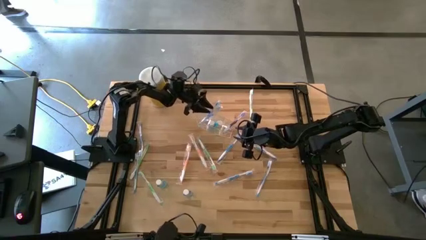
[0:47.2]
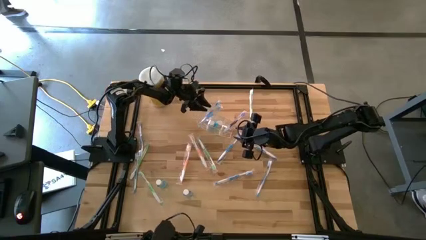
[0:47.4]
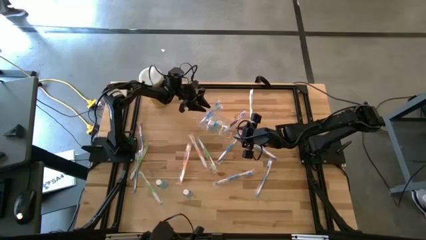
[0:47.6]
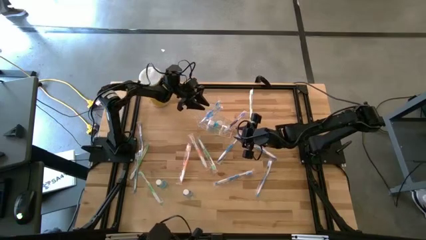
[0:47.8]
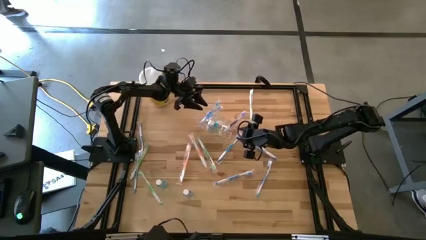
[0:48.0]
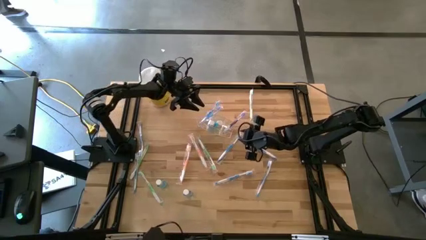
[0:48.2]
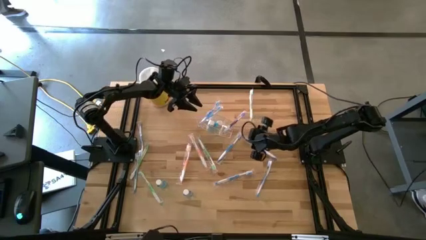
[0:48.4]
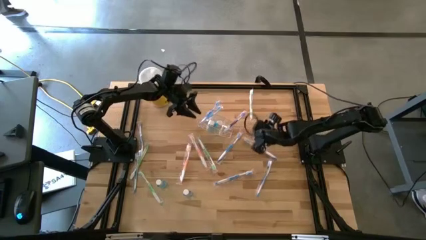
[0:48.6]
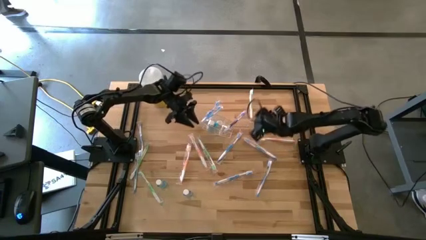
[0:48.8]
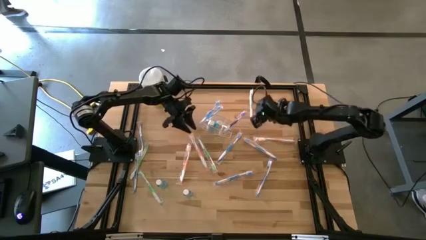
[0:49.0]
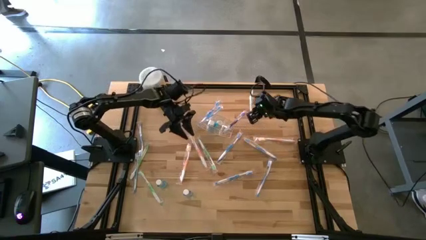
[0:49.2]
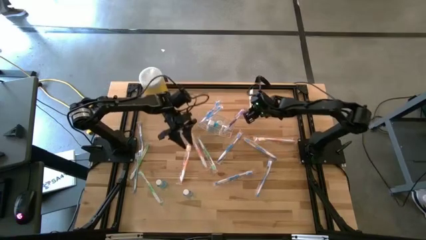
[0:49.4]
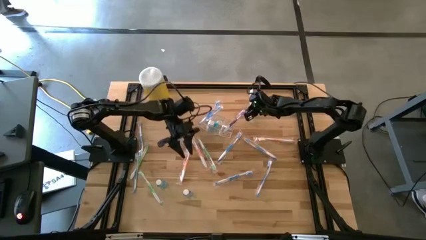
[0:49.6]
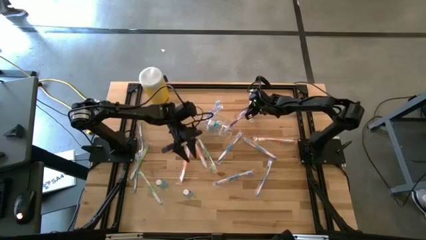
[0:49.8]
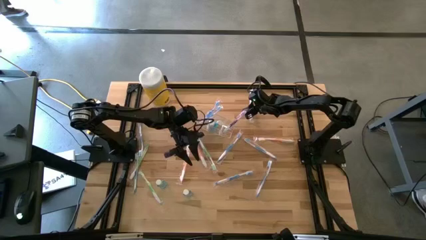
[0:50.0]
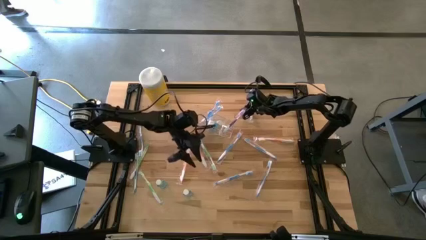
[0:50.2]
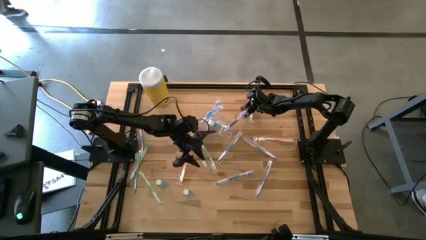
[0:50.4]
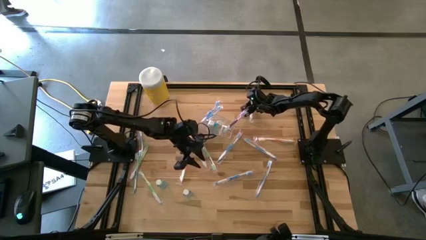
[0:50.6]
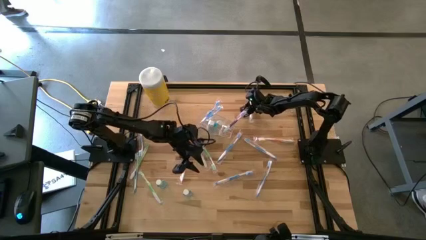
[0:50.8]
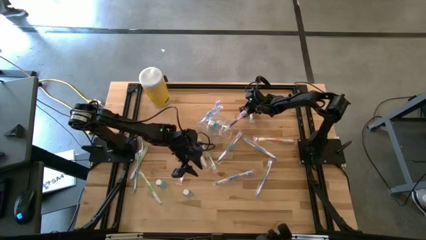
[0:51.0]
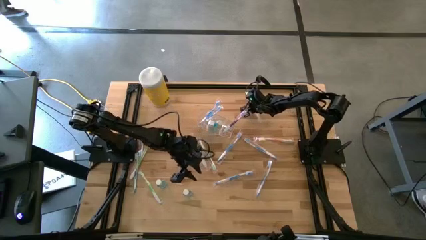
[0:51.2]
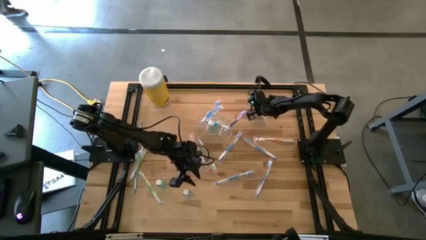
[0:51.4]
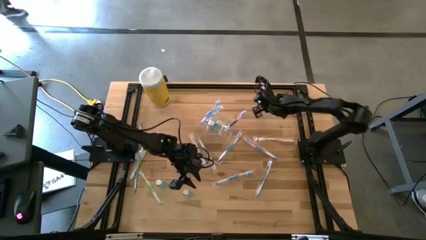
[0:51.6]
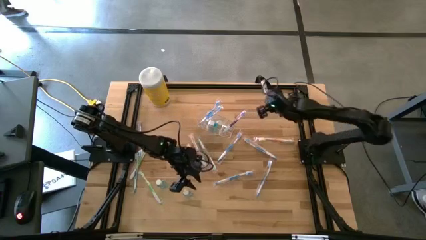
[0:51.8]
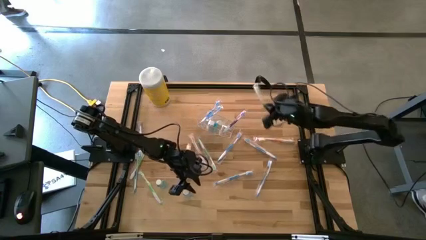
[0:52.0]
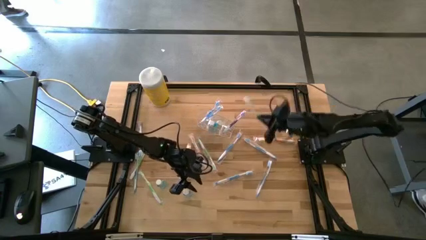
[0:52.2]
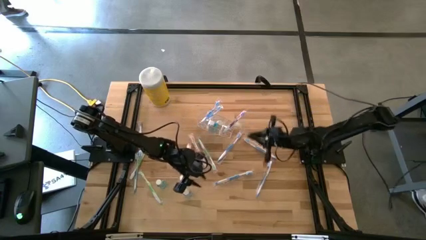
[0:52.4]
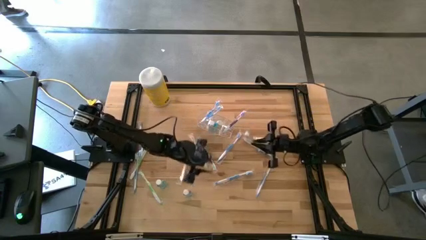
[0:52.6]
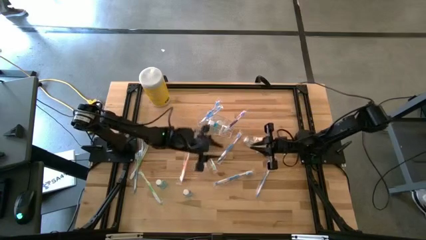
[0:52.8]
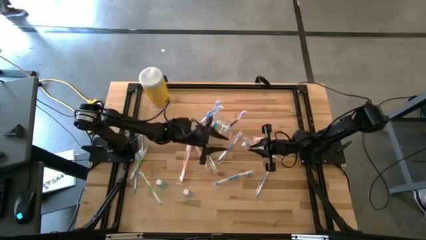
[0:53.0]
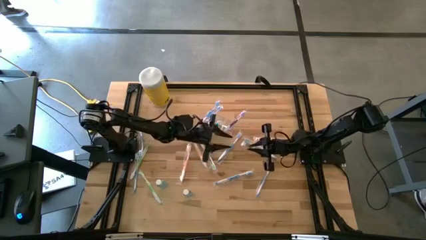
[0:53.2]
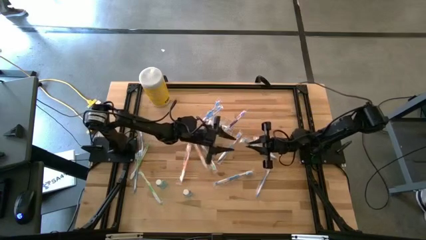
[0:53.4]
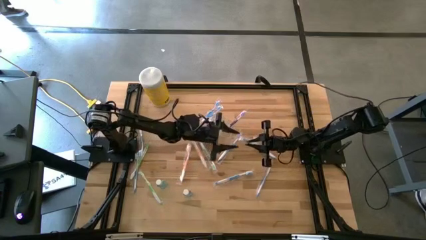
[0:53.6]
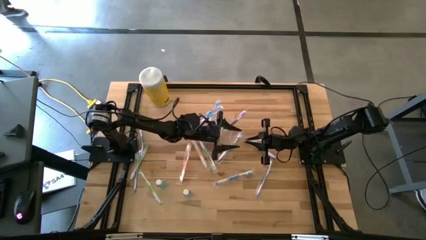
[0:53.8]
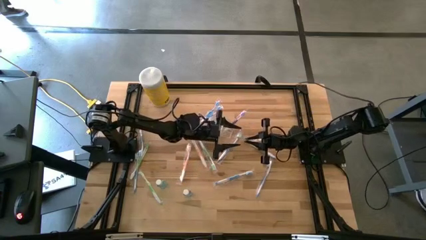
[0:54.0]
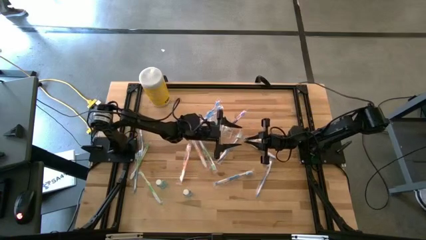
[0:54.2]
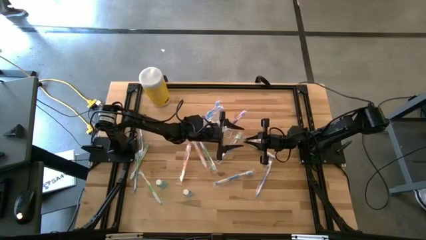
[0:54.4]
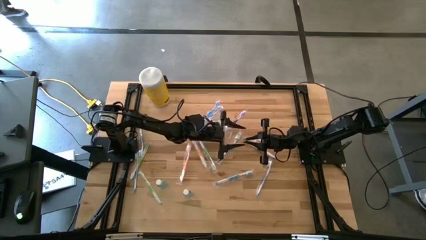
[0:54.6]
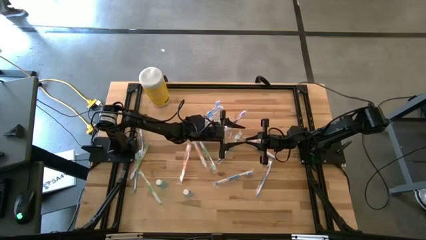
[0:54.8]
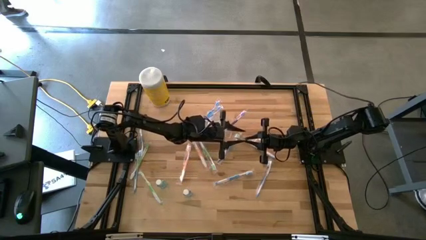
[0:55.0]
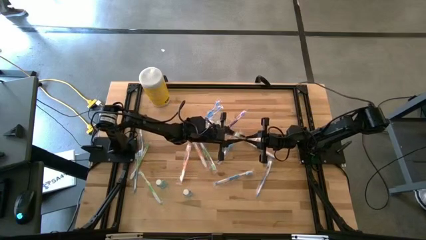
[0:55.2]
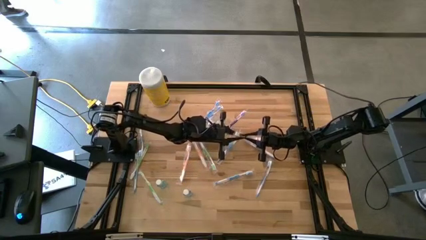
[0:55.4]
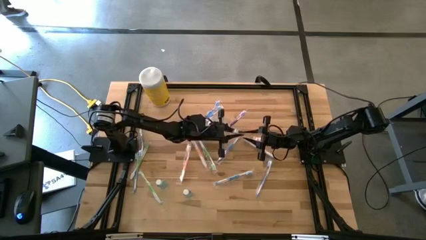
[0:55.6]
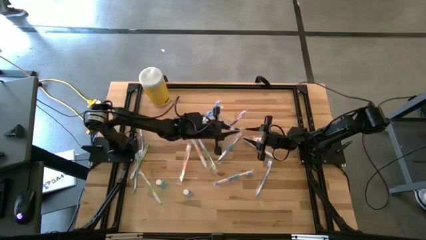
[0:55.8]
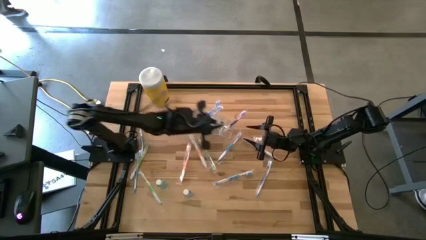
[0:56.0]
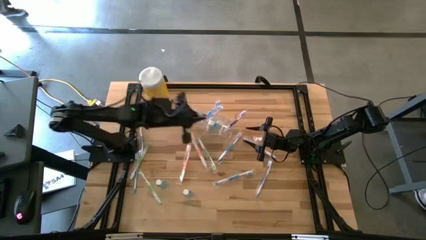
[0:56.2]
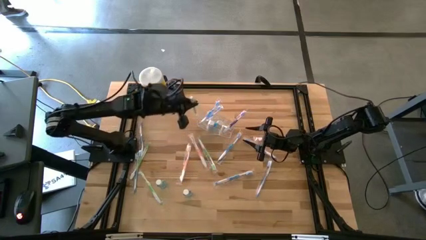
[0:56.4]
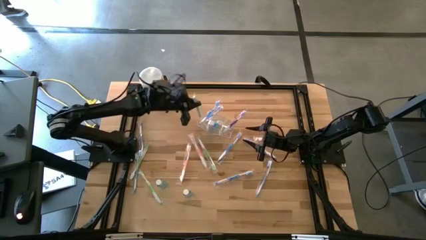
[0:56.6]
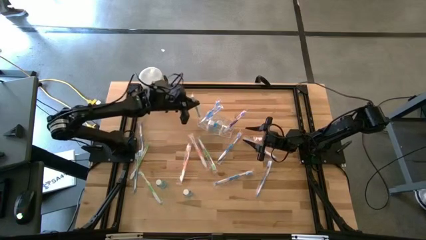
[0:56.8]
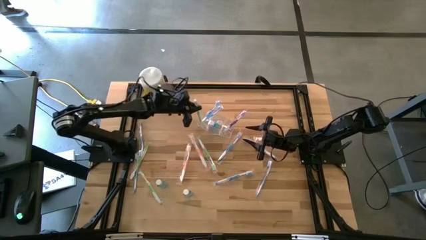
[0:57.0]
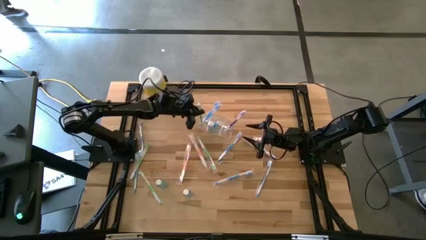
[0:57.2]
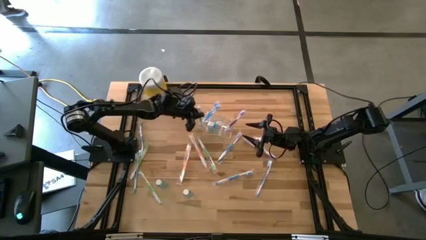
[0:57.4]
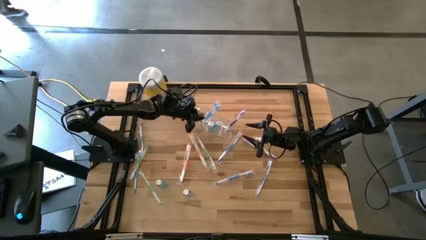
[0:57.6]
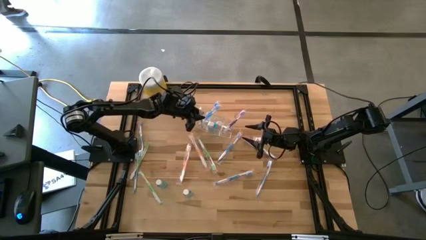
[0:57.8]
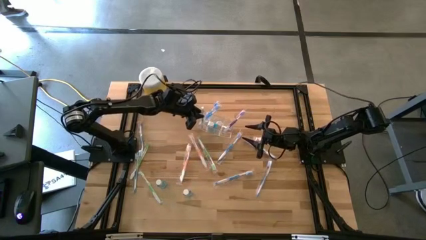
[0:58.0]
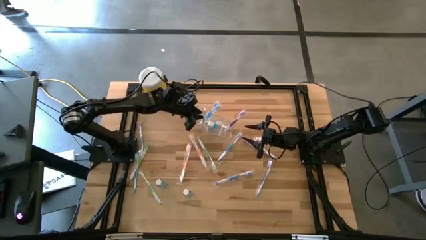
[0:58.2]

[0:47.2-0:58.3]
Task: Pick & Place toothbrushing station
Put the green toothbrush into the transparent organizer

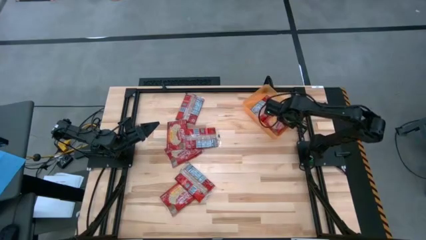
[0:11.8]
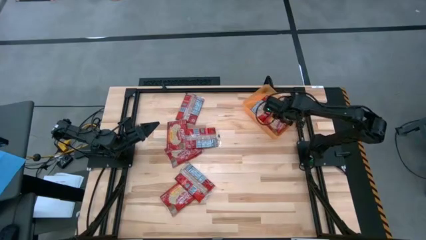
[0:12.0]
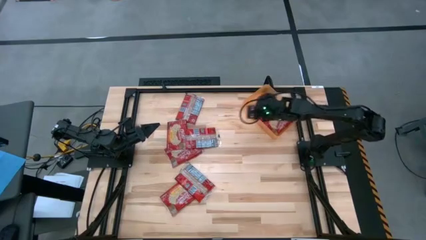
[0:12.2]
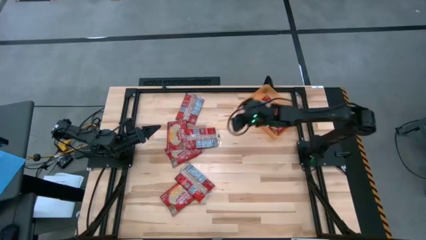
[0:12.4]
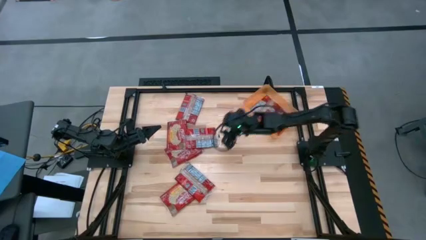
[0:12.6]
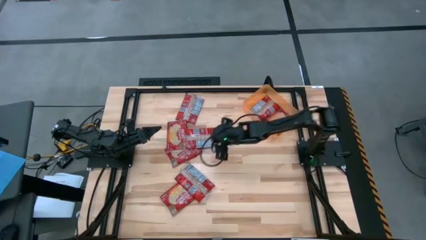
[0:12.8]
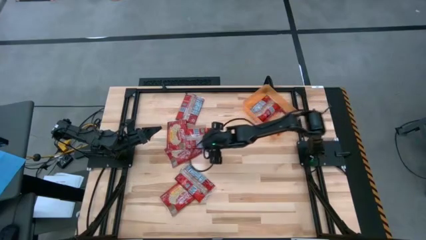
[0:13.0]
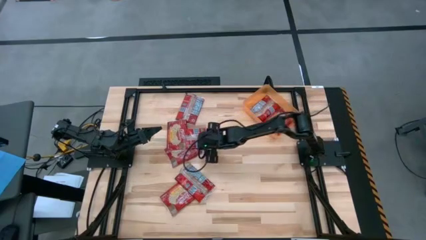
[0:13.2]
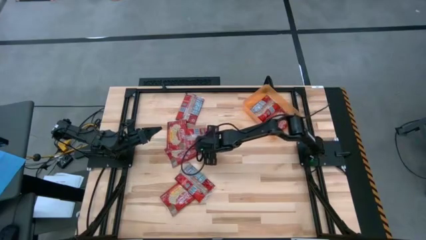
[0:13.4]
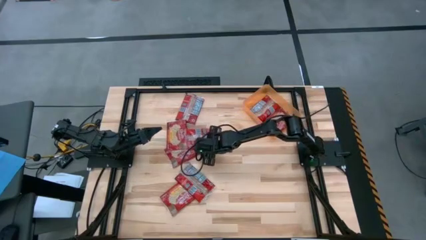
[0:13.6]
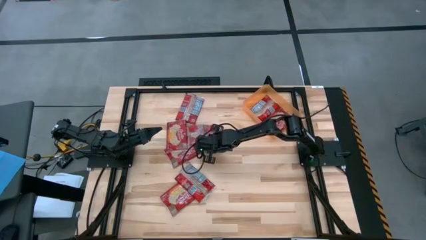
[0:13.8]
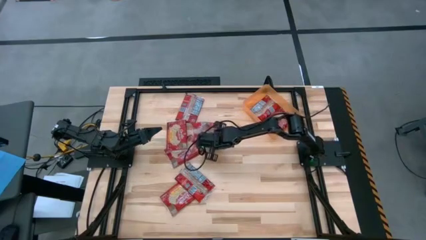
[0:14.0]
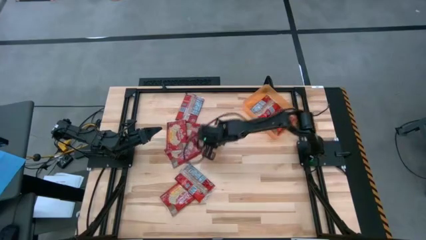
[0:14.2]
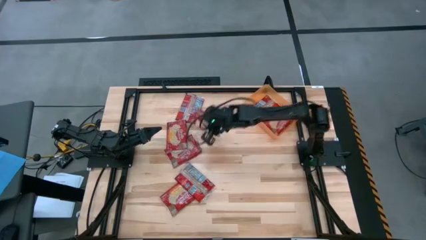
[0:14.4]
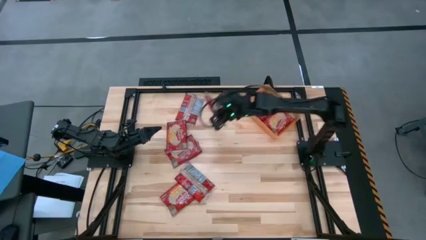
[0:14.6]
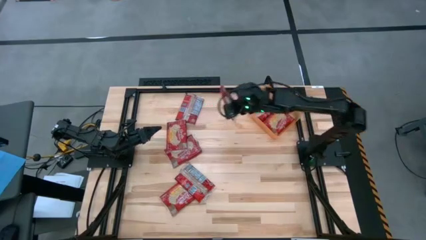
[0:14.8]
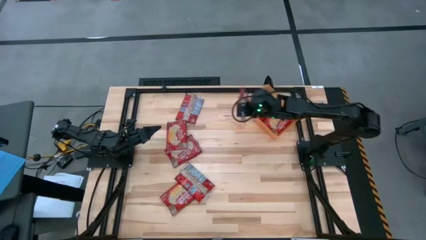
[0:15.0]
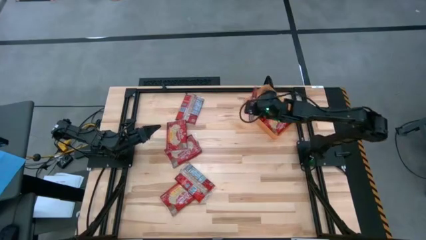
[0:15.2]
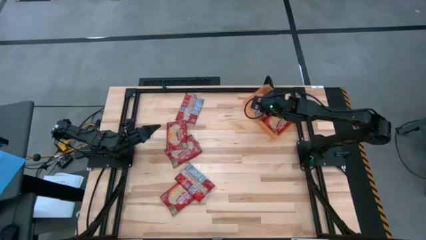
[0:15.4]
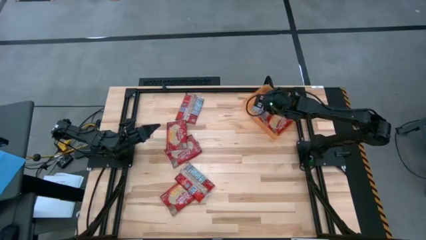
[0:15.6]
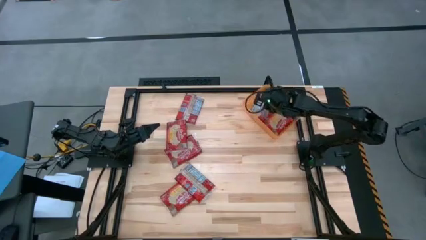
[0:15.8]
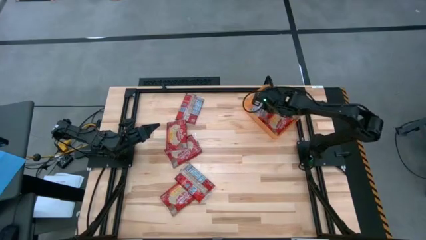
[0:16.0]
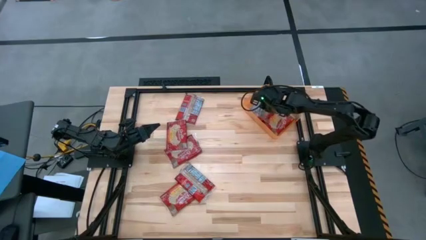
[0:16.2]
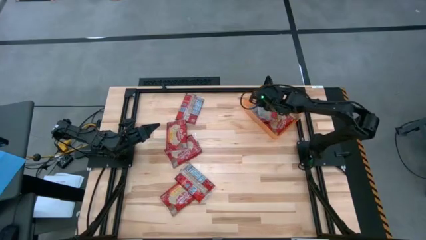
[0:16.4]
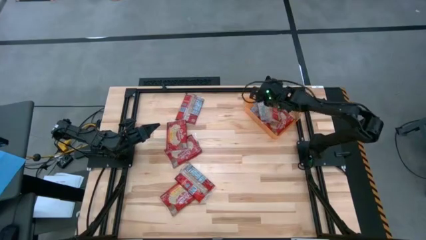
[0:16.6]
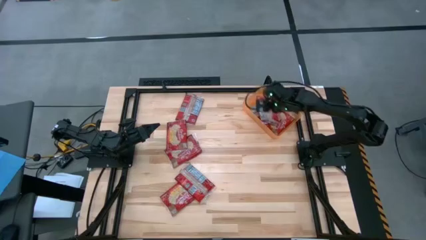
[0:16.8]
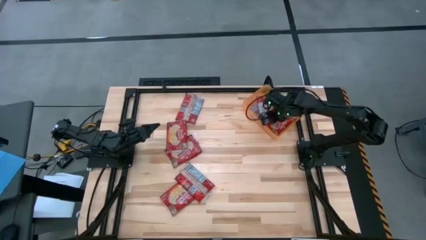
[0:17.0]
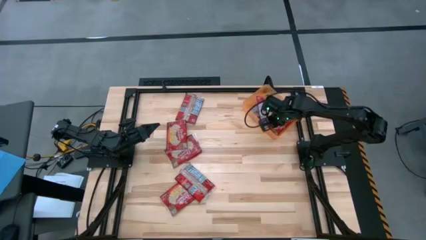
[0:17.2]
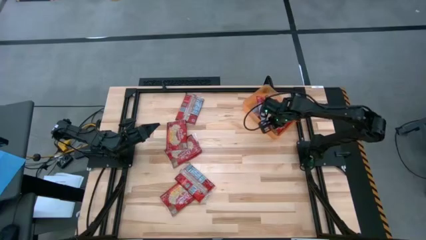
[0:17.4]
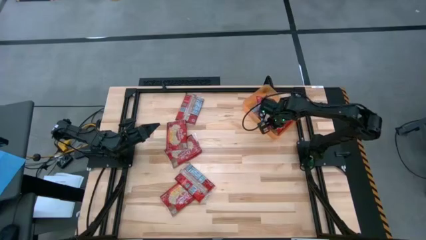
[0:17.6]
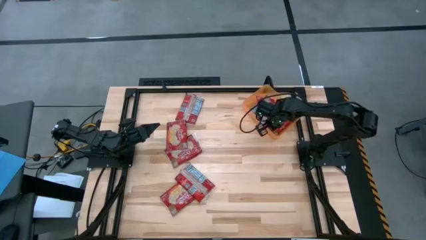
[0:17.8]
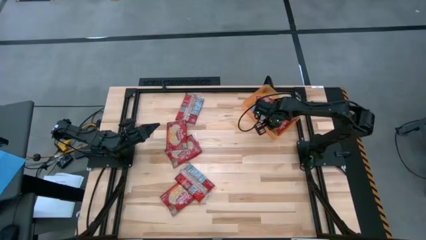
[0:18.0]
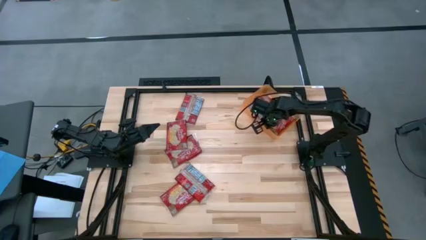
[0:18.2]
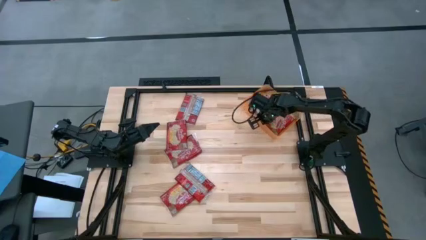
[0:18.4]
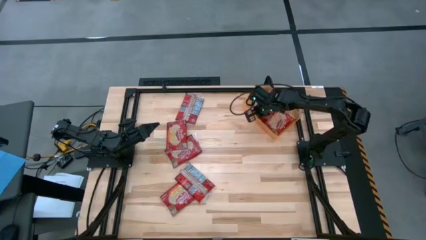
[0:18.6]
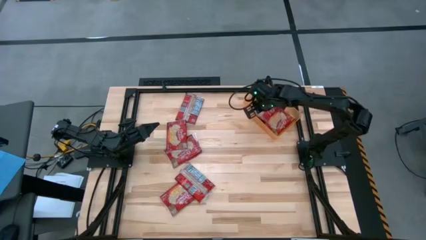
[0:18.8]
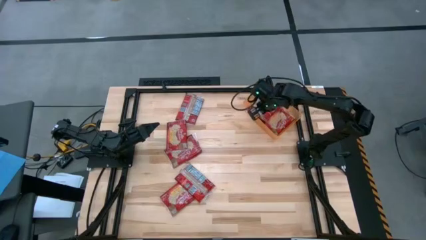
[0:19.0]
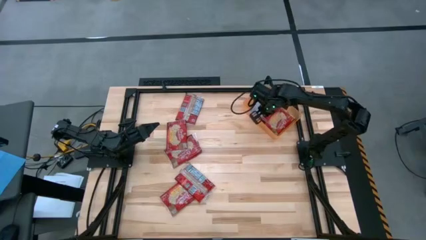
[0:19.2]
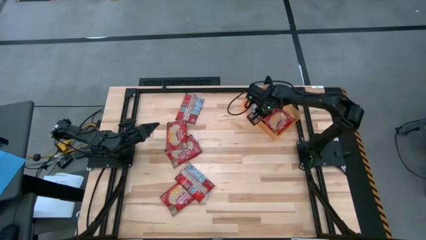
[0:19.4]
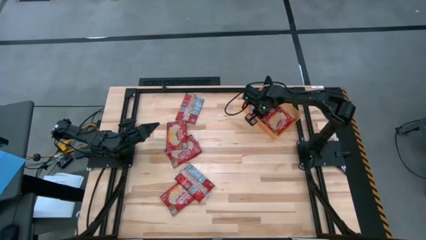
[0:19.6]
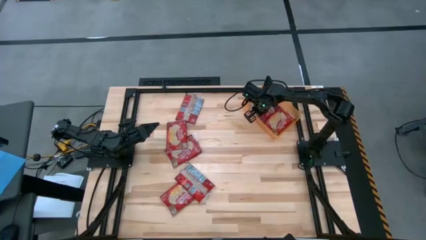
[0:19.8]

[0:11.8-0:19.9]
Task: Sort popcorn bags into baskets
Put the red popcorn bag into the orange bin
